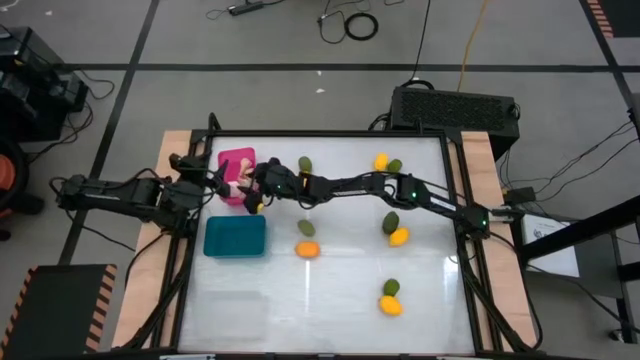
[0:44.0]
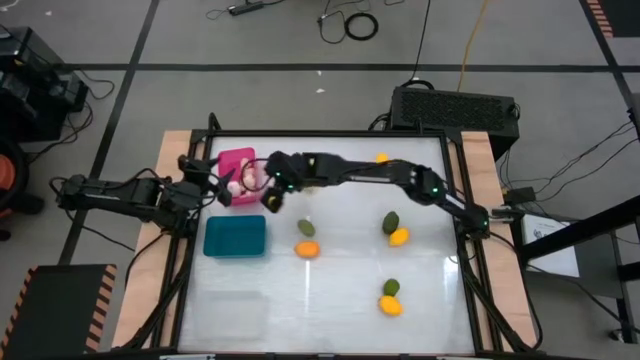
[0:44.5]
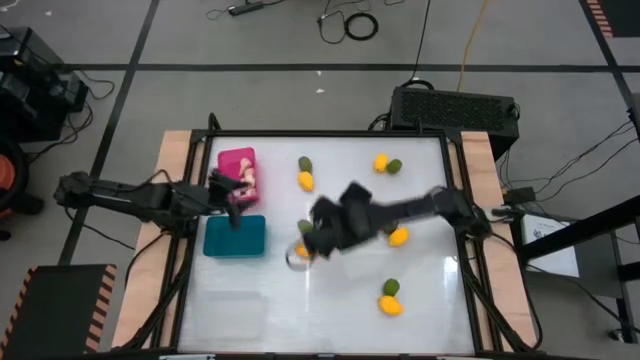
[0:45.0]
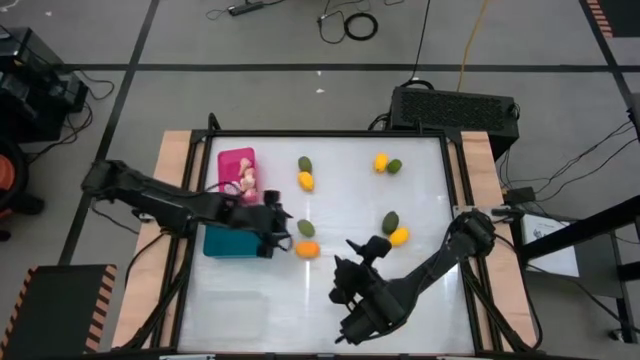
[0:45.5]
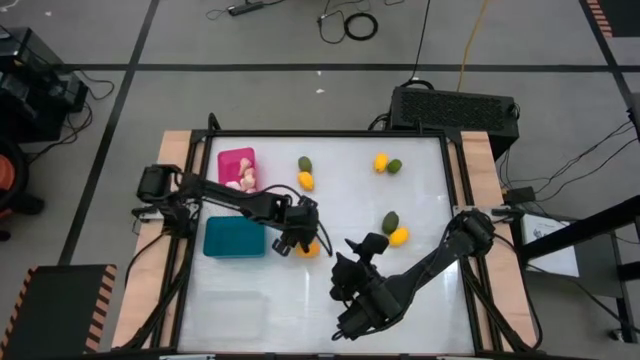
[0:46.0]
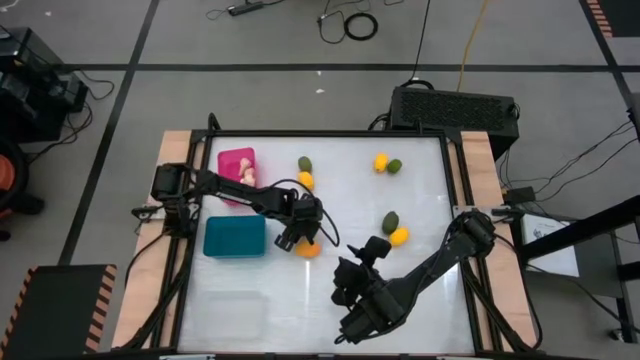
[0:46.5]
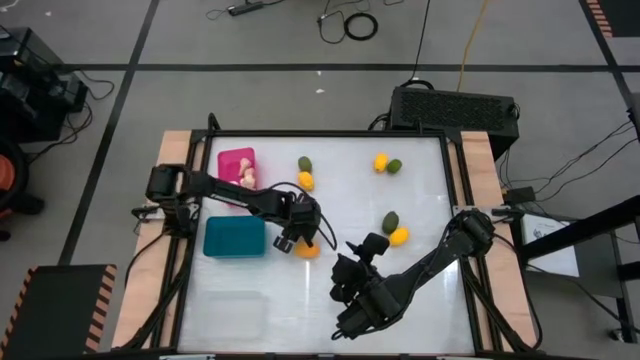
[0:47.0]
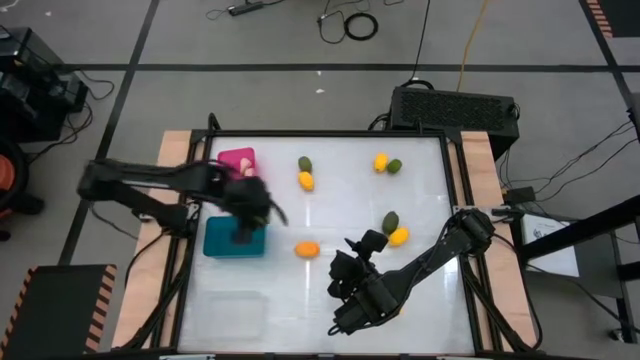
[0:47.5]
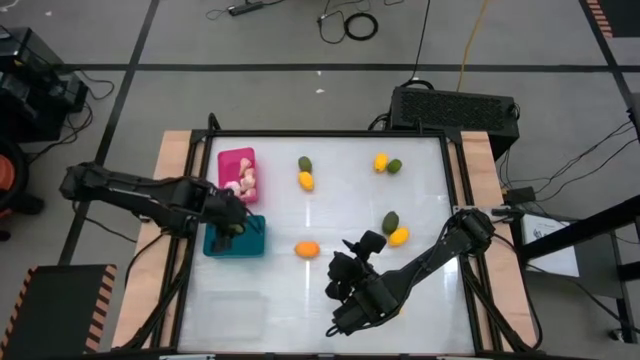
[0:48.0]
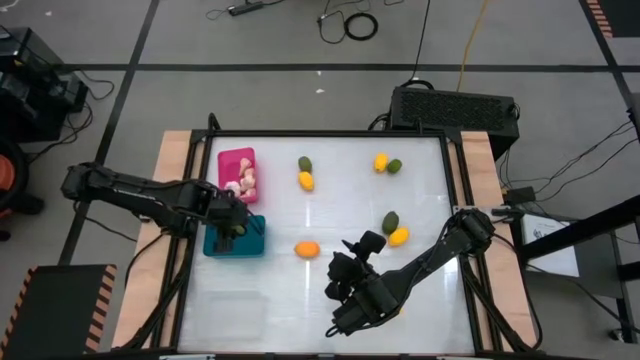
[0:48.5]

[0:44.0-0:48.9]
Task: Sort produce into baskets
Put the green lime into the blue bin

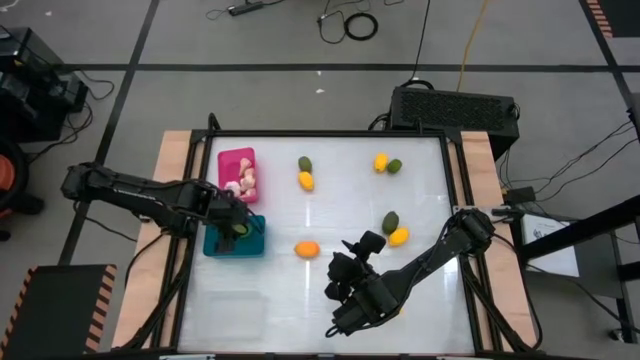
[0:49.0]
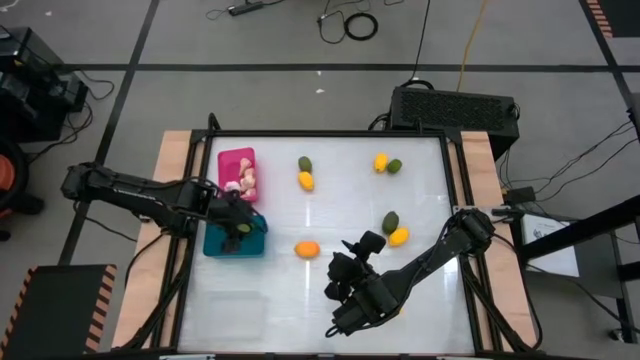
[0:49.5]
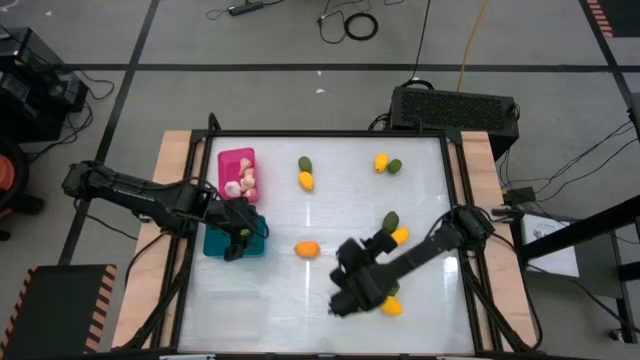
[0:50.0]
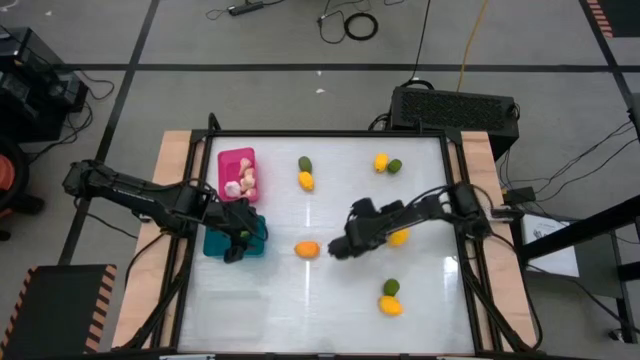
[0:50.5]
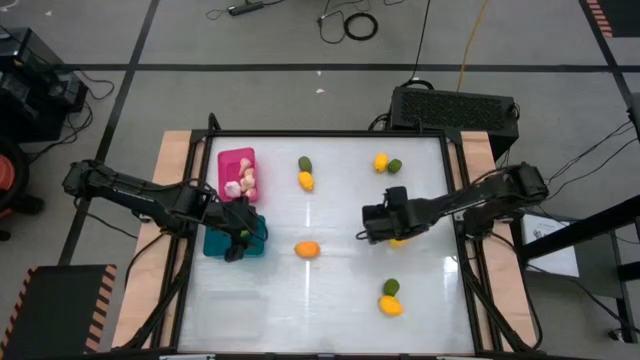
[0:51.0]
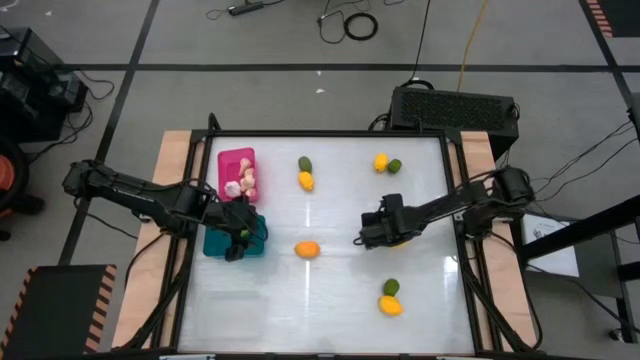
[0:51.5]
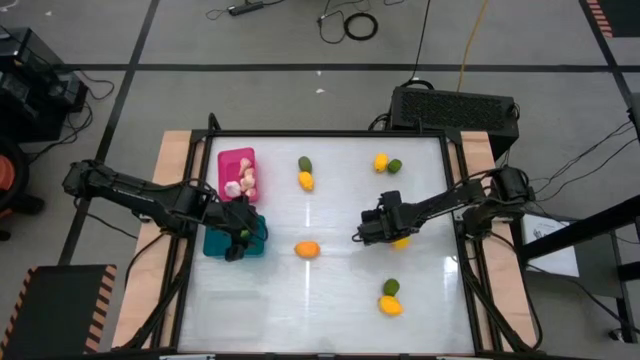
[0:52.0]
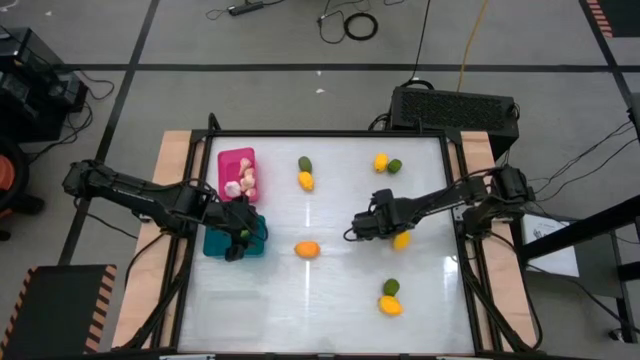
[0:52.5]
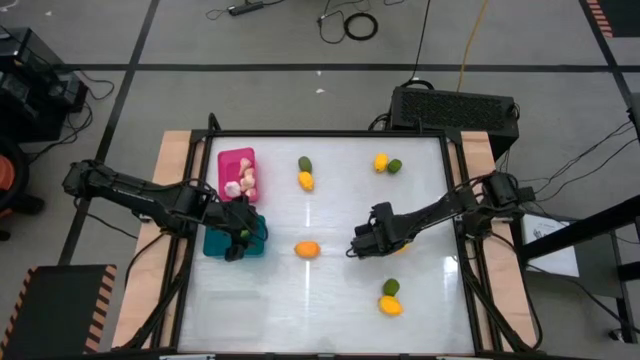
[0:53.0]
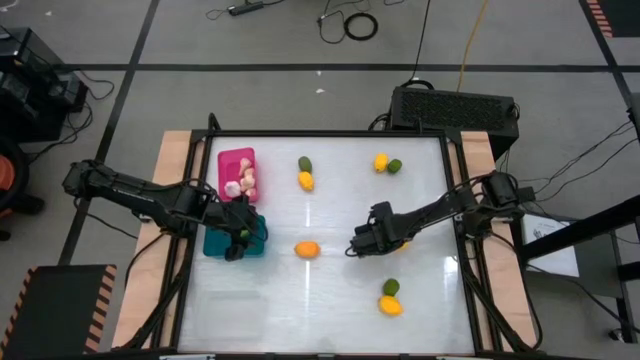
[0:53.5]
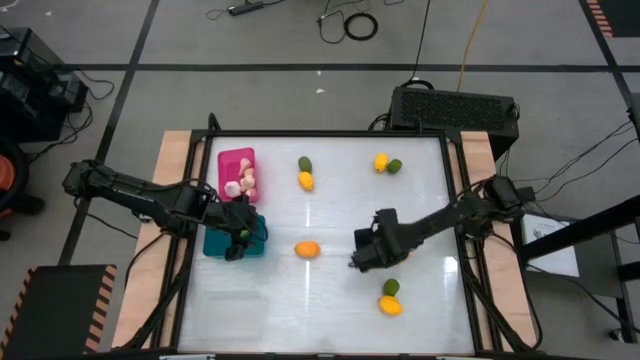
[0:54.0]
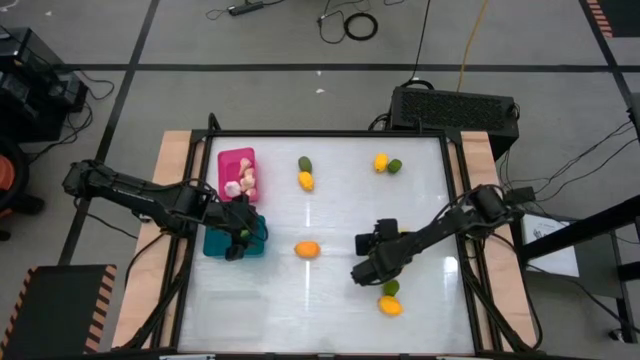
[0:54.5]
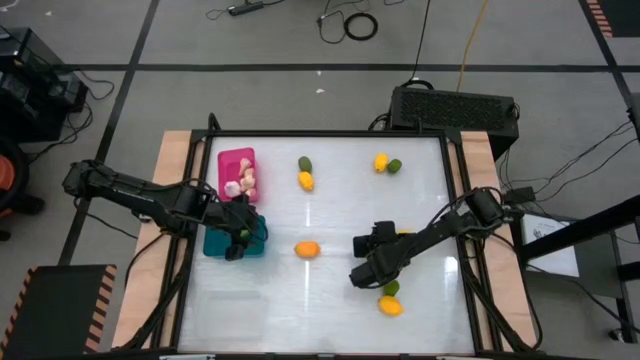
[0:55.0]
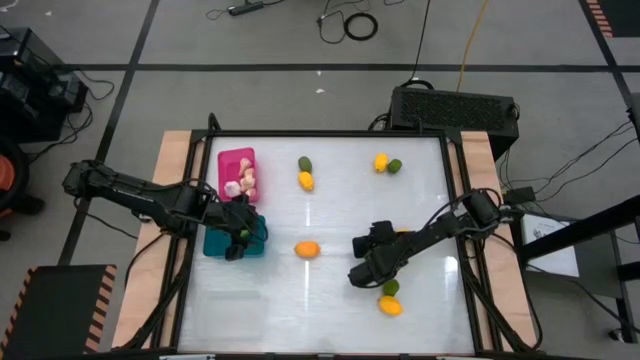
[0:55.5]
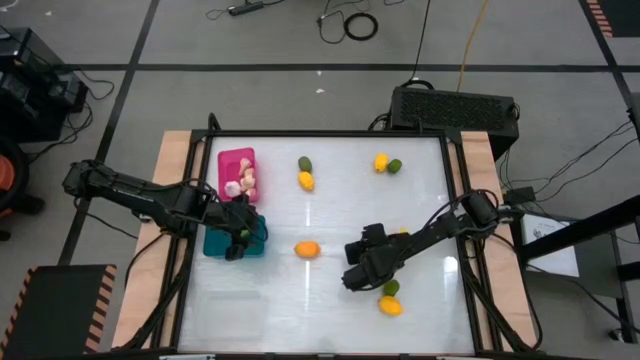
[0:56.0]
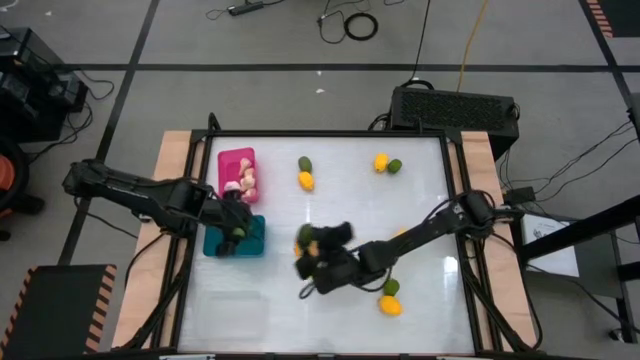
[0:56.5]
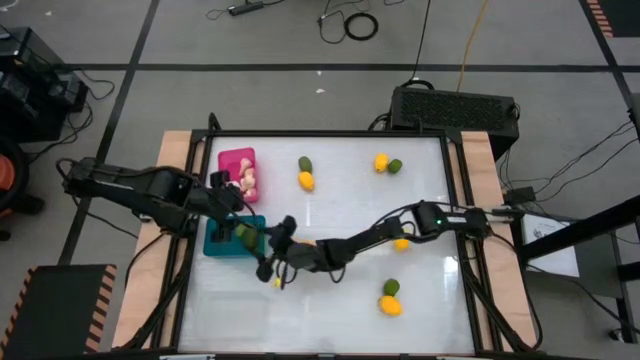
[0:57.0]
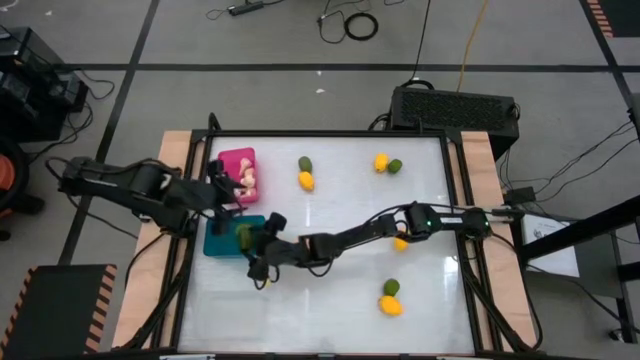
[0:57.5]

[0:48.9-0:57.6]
Put the green lime into the blue bin

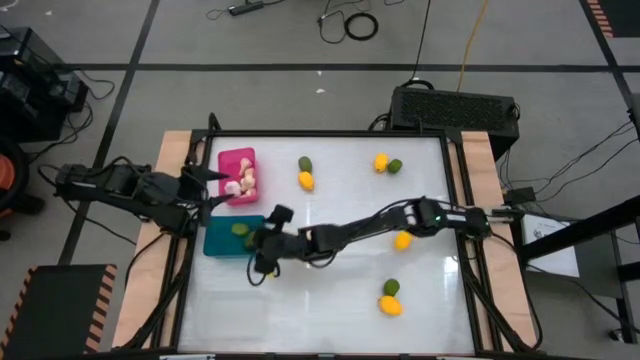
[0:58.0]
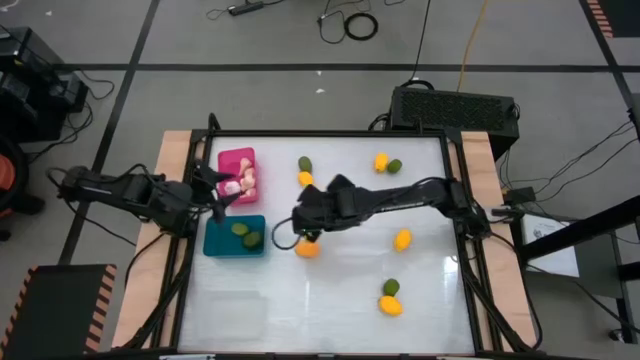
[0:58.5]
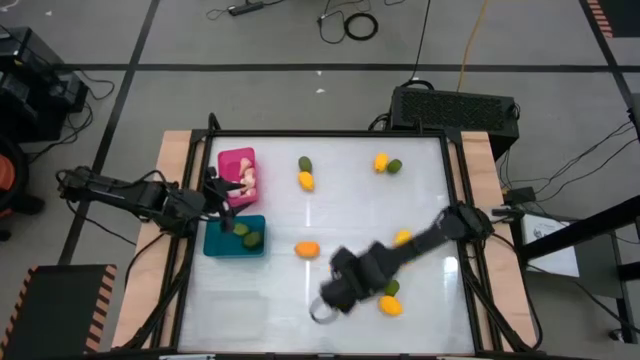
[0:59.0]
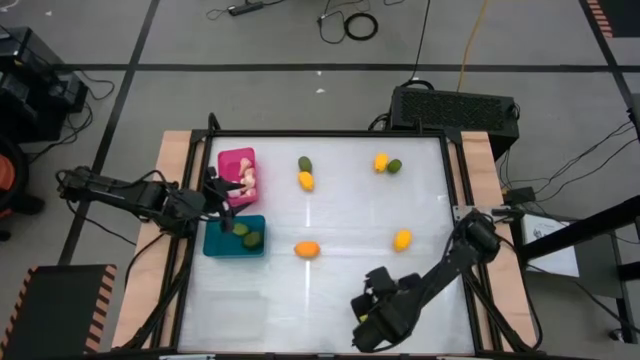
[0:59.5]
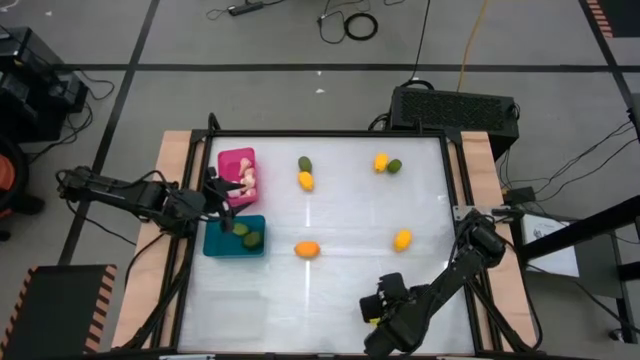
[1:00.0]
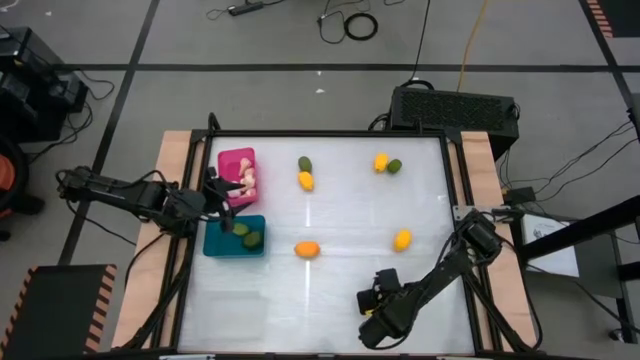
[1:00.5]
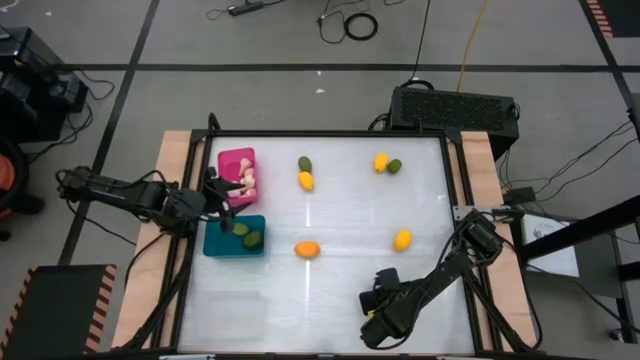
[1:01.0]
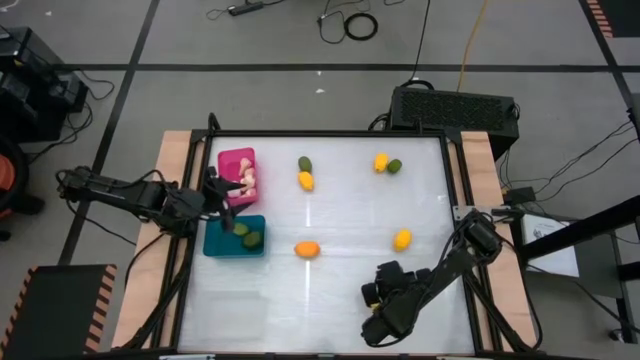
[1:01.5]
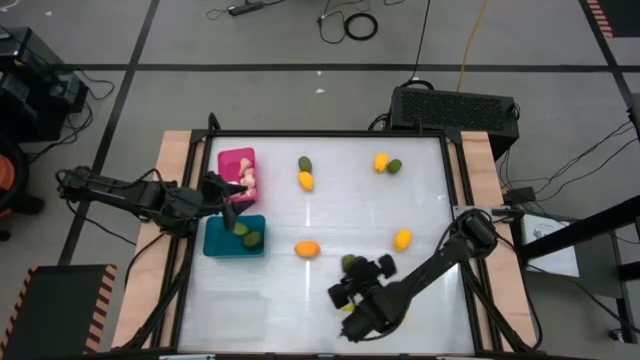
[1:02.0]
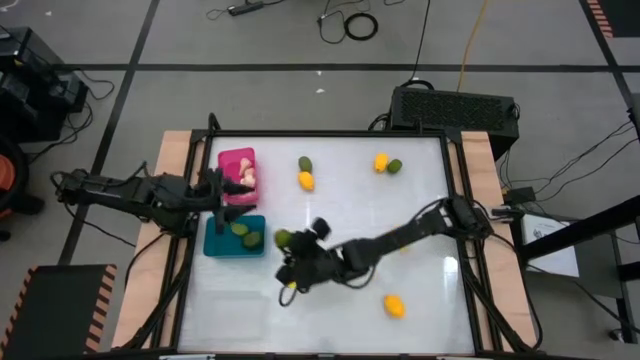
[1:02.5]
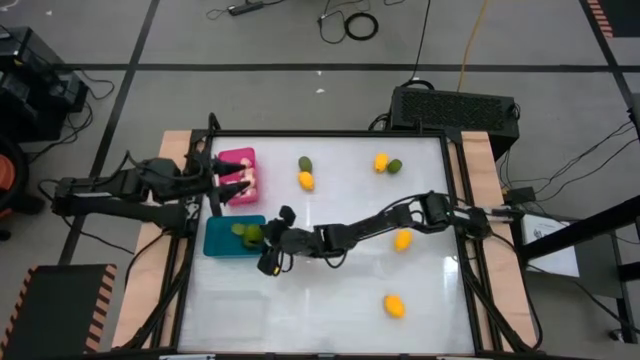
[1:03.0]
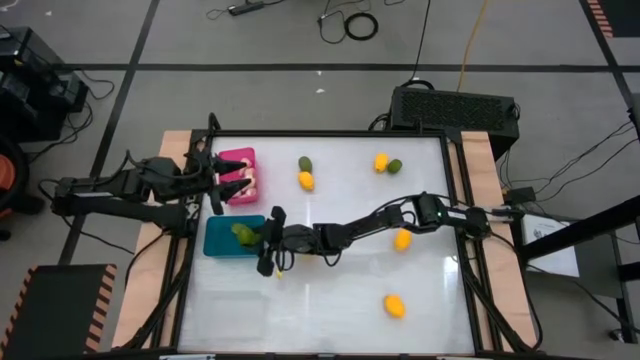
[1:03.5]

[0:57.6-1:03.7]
Put the green lime into the blue bin
